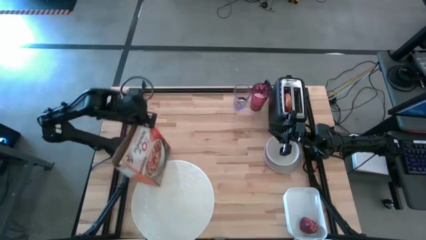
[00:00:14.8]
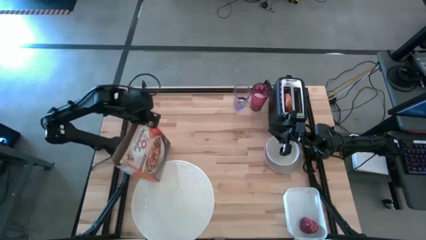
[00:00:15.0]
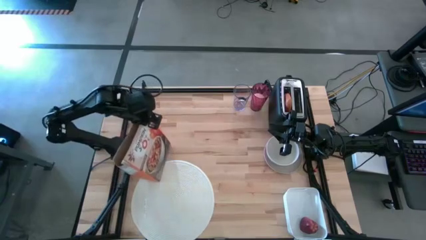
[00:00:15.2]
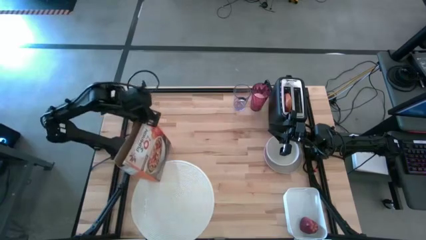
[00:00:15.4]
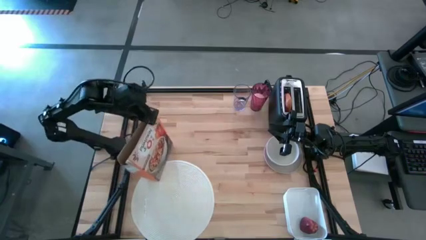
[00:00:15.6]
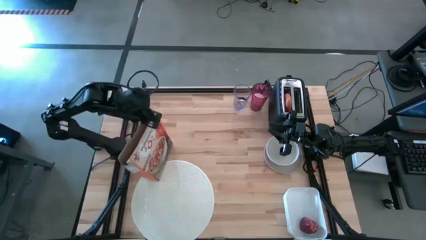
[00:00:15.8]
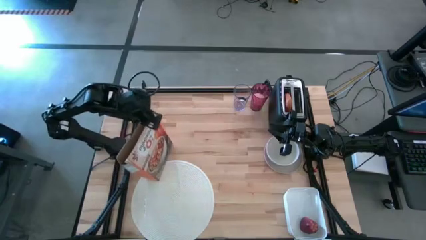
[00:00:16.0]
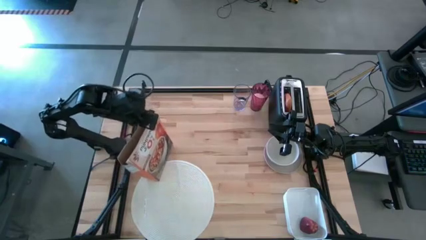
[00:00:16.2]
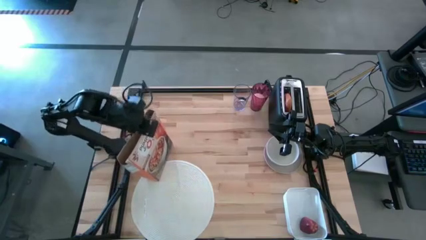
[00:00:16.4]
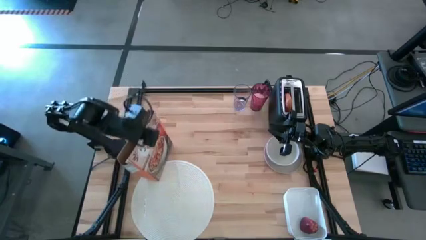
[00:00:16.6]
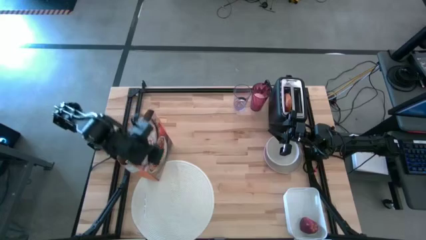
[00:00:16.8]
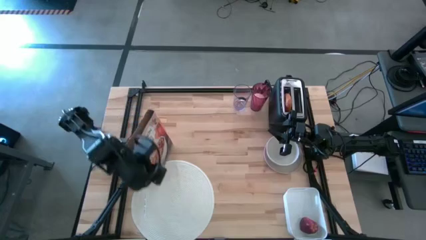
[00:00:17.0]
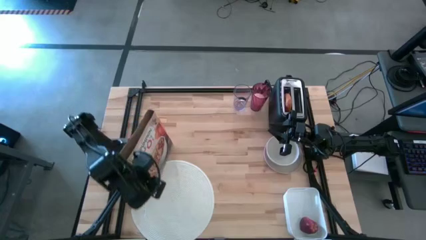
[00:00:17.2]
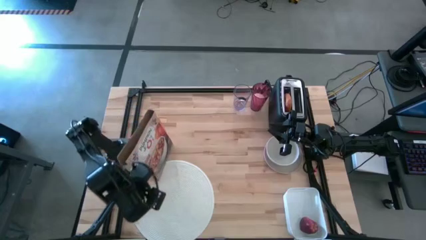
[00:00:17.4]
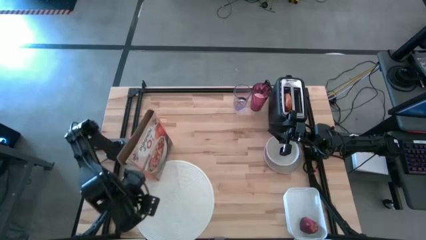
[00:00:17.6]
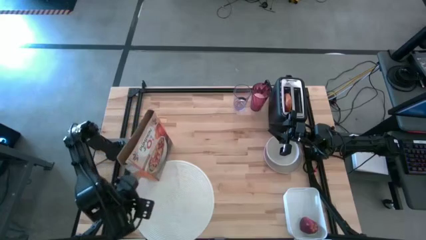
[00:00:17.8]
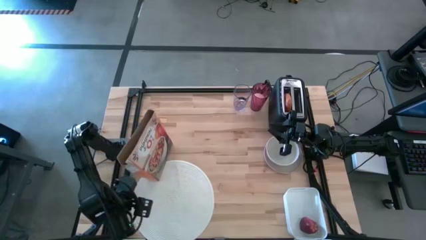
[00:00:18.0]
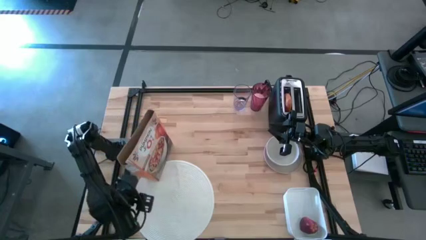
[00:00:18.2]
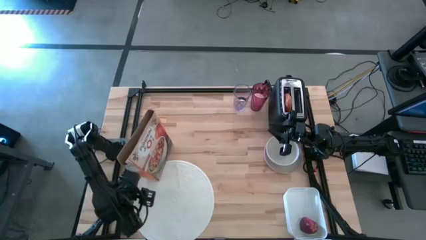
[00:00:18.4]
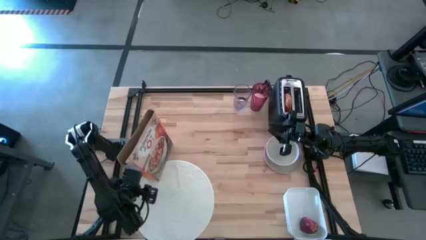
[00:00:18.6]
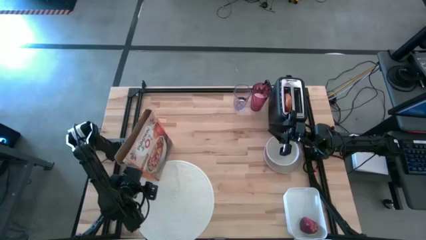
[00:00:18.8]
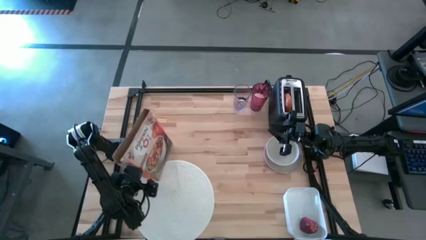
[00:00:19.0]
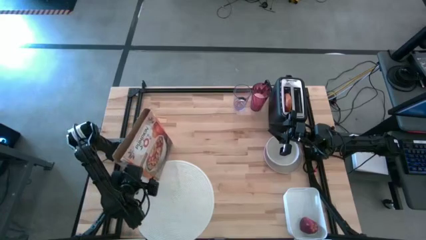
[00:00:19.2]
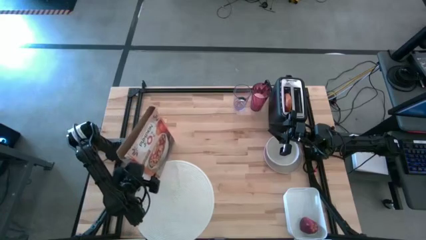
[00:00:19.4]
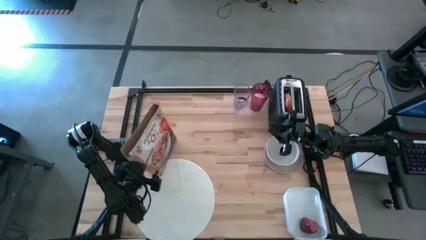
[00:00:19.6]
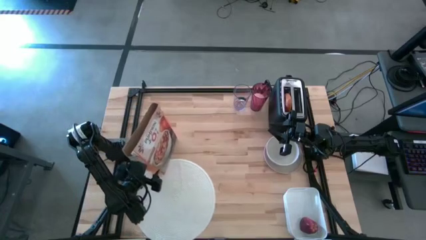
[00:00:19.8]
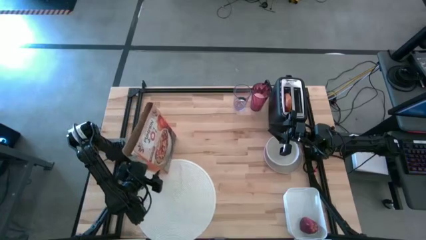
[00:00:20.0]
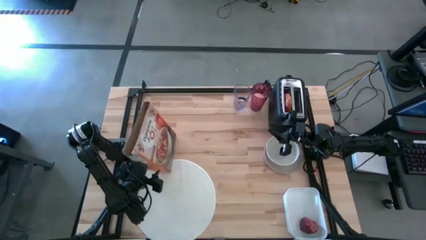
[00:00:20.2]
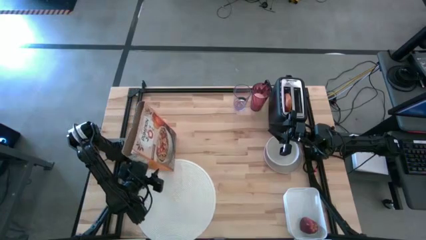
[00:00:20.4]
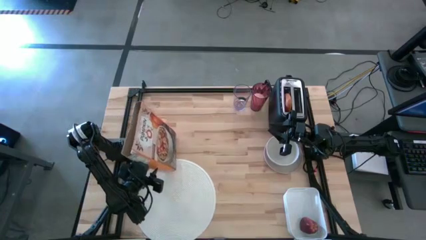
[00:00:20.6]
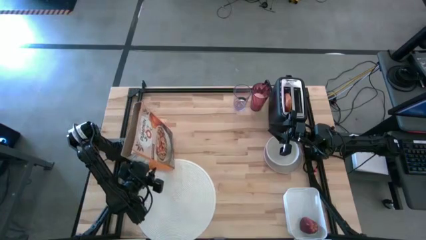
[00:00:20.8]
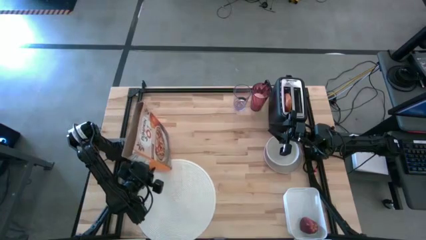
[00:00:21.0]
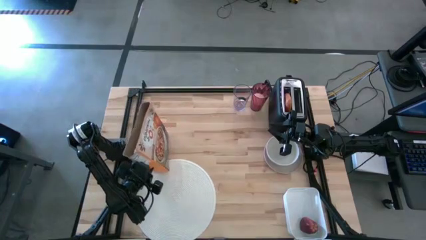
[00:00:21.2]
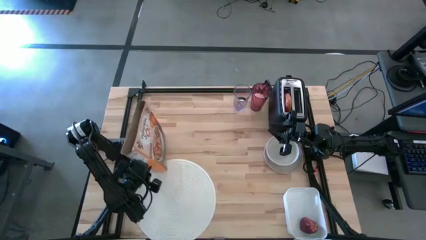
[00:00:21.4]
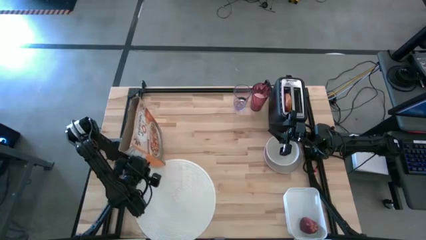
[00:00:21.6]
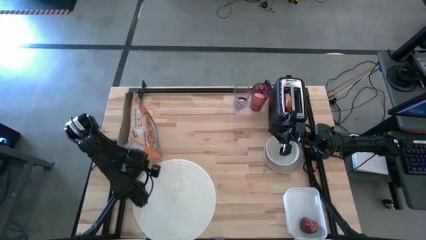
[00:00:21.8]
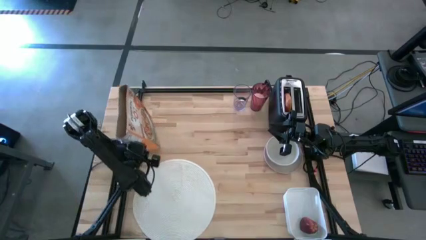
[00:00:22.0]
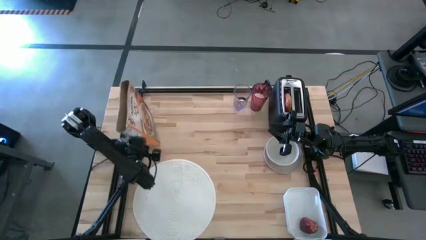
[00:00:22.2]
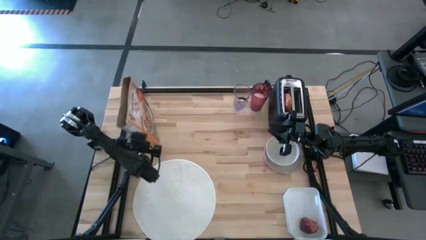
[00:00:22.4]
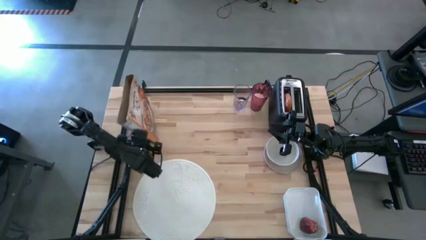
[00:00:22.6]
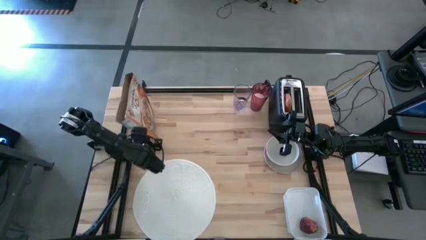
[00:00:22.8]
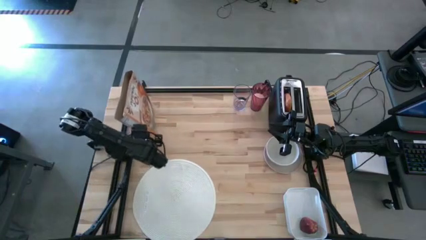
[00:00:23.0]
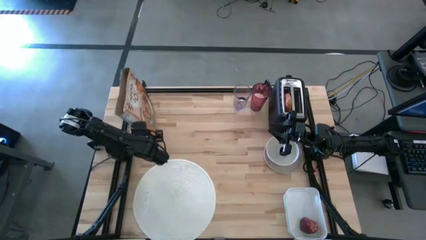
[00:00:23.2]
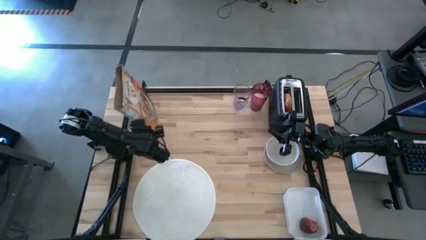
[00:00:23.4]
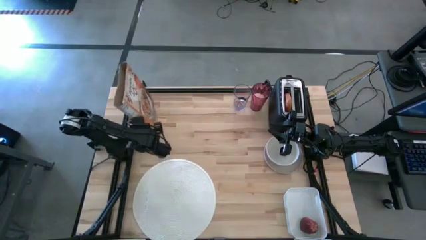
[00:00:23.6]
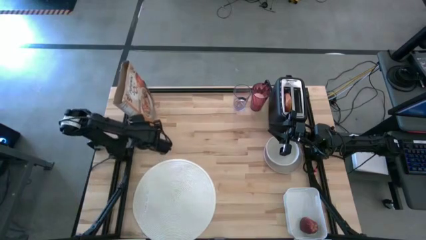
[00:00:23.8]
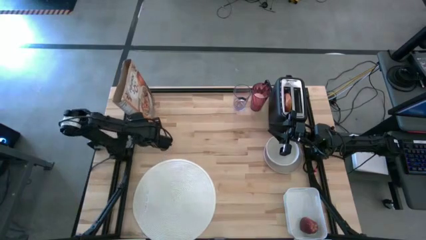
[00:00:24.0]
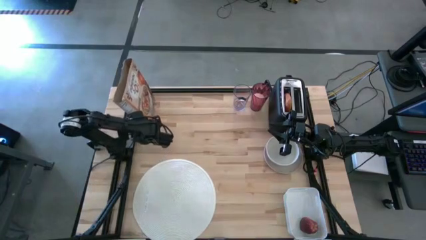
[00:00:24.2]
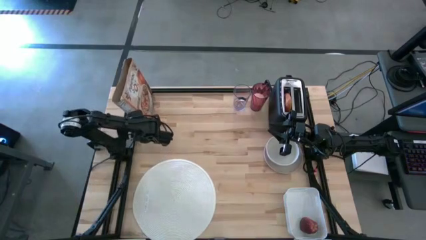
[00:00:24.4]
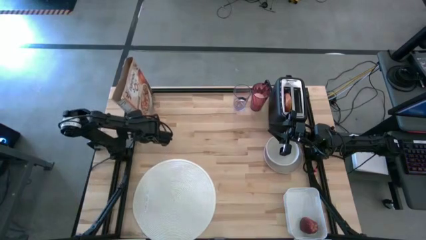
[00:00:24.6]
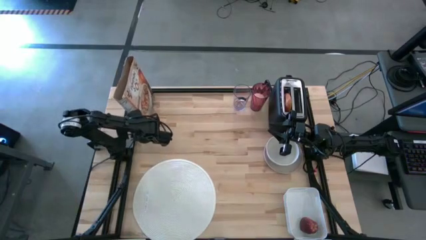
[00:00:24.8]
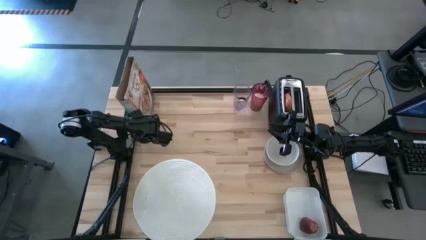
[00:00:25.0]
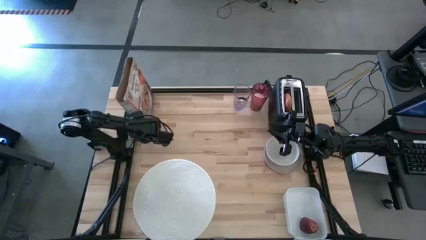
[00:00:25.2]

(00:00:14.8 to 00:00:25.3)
Task: Arrange a breakfast setting
Move the orange cereal box to the top left of the table

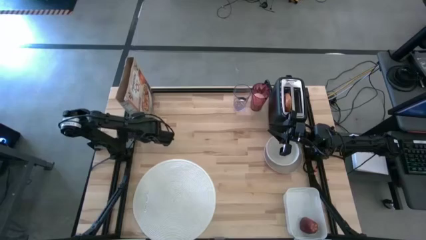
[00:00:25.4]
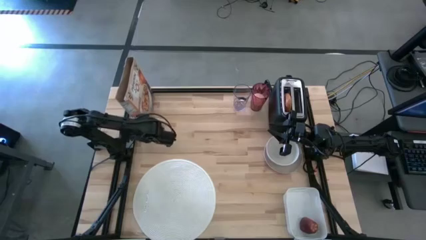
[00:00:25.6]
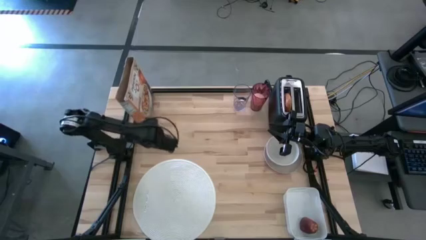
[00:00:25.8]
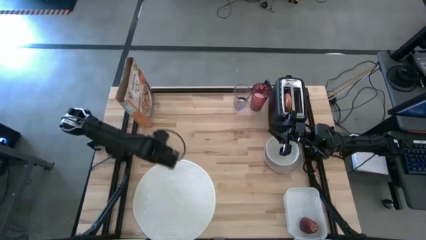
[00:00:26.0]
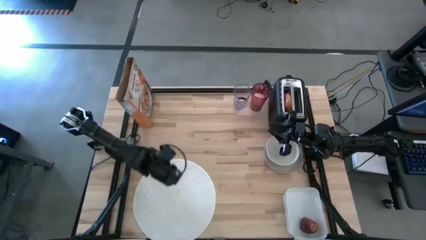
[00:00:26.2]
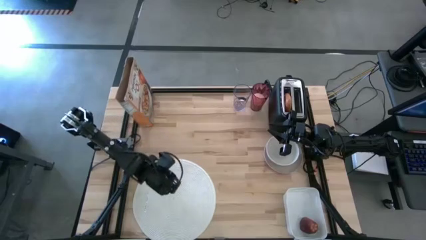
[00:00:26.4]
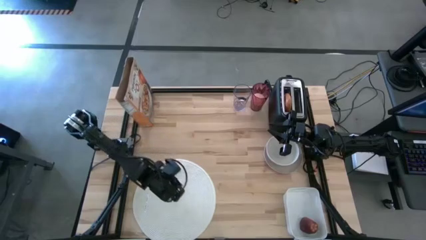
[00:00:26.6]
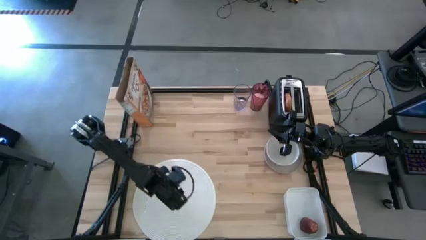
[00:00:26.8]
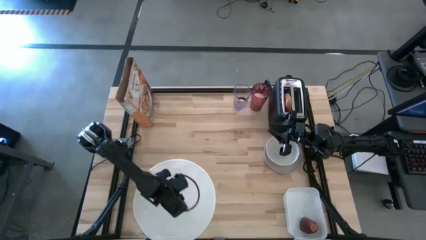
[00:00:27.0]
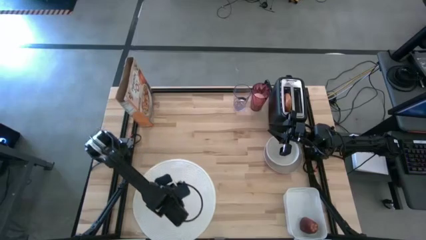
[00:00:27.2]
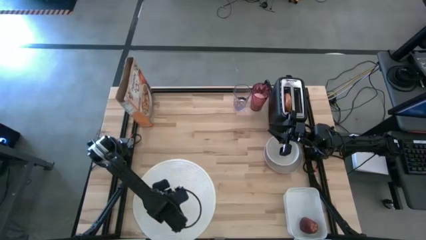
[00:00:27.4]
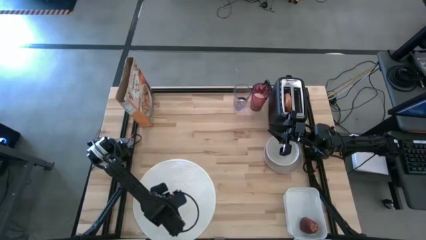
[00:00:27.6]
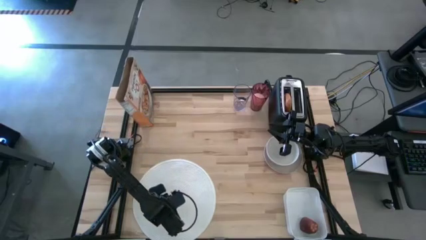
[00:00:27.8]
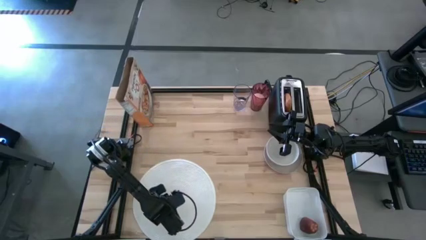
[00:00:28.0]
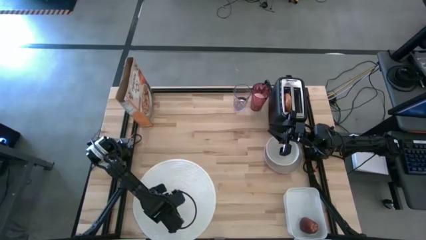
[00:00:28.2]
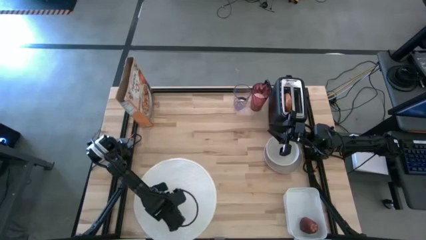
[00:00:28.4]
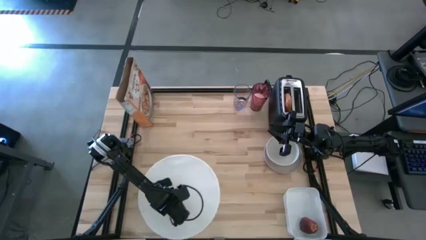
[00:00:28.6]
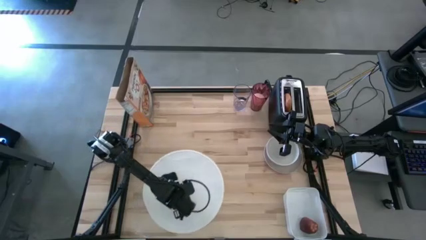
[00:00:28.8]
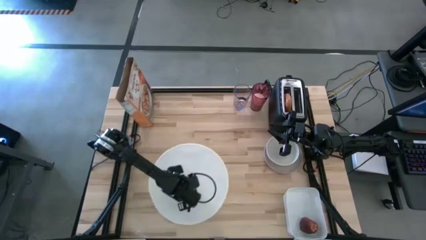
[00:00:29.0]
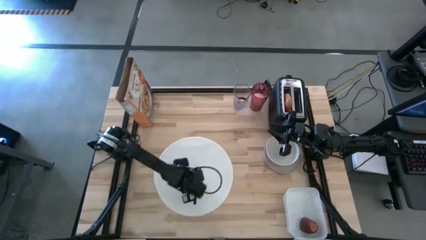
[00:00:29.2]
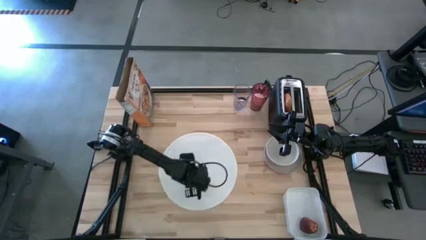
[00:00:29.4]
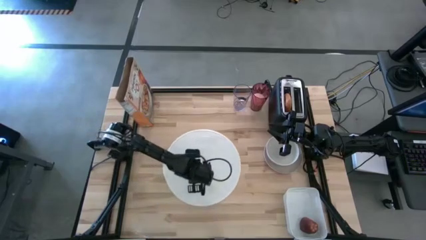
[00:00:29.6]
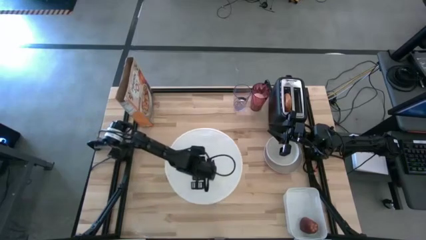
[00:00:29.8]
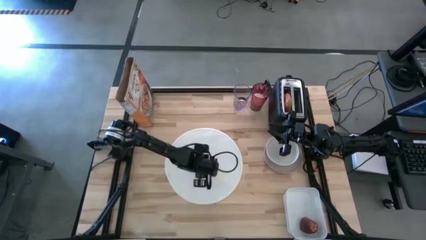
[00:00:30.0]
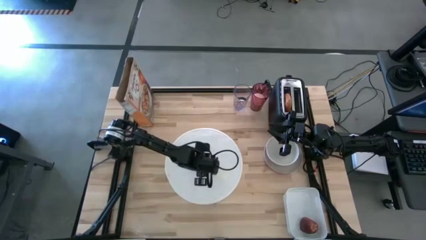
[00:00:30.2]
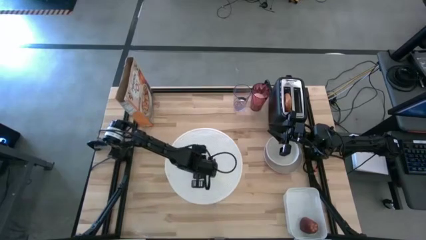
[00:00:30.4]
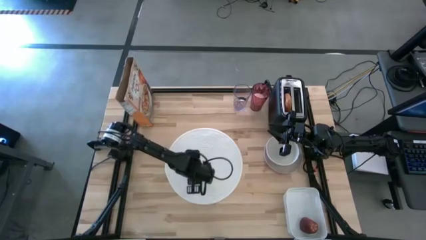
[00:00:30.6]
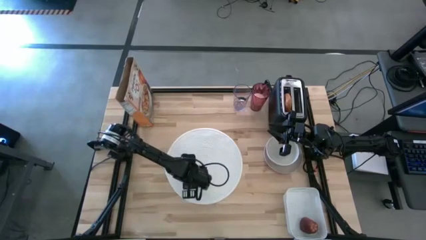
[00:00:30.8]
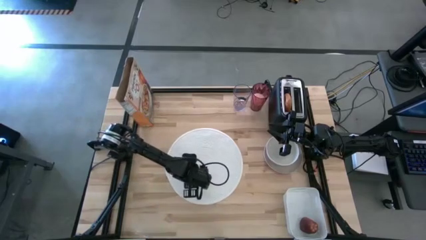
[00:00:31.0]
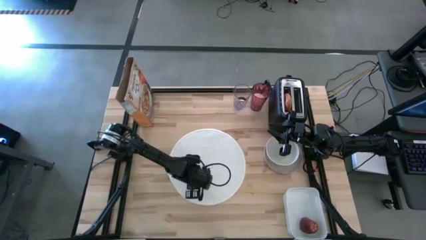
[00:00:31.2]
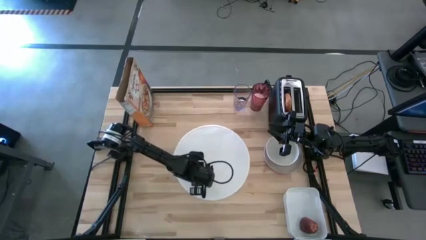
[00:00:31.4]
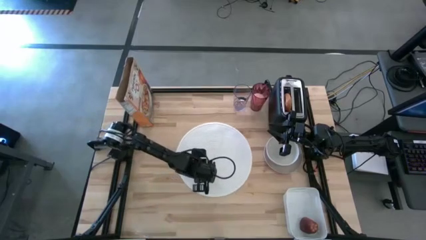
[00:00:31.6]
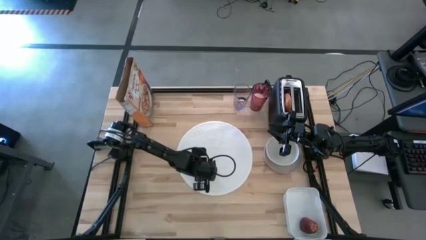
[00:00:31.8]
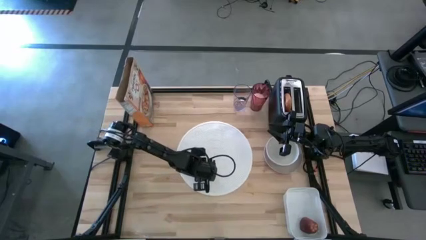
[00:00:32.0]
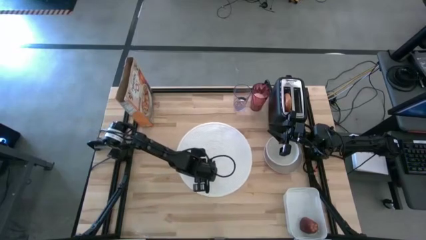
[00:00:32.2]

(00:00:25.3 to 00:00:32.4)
Move the white table mat to the center of the table
